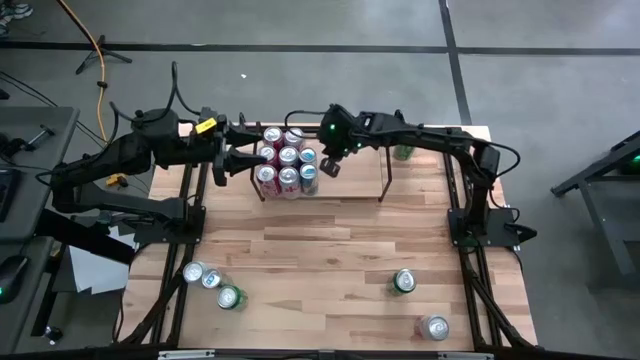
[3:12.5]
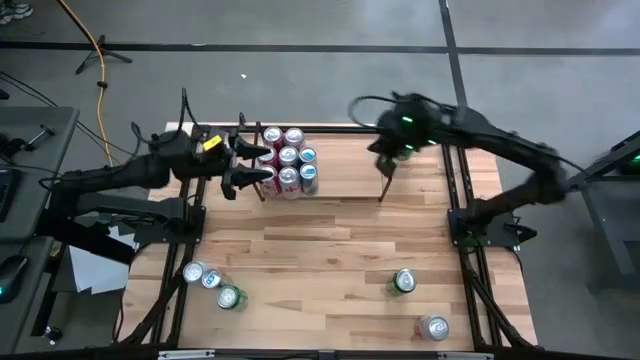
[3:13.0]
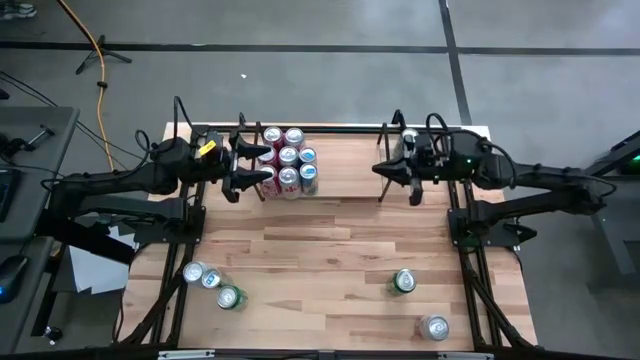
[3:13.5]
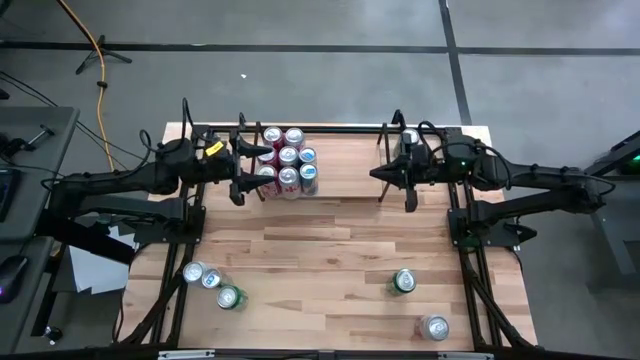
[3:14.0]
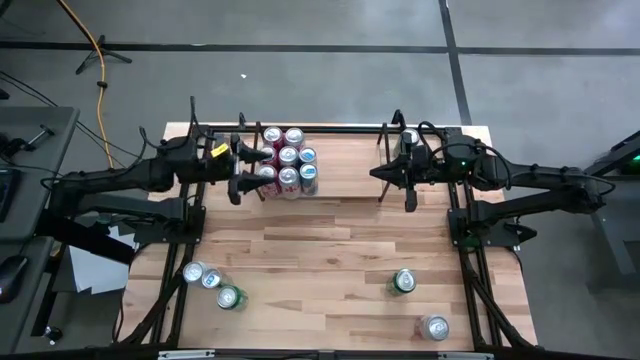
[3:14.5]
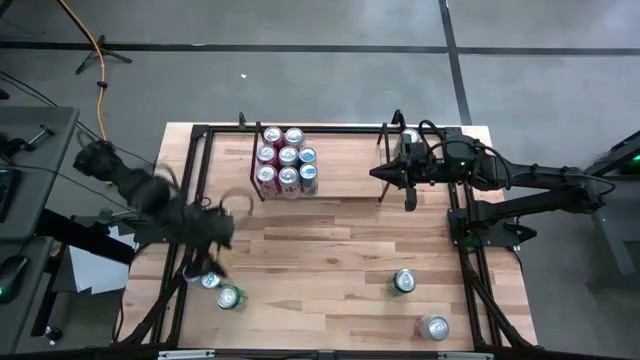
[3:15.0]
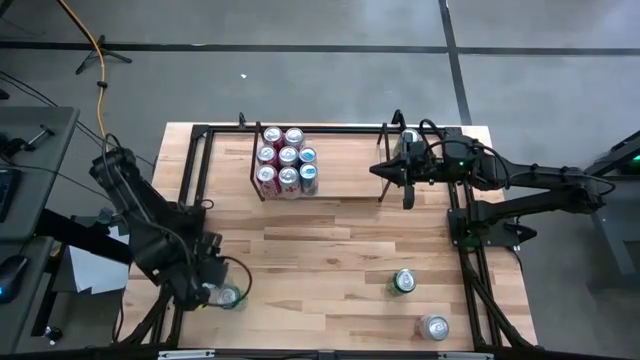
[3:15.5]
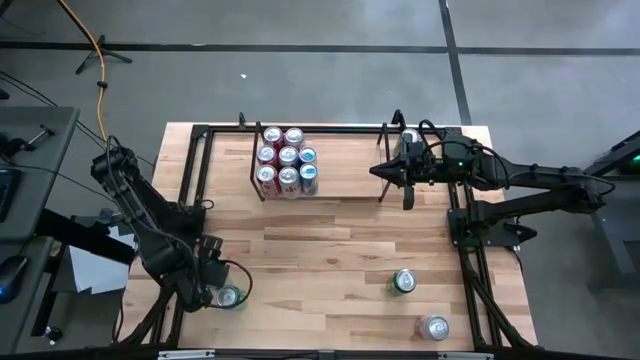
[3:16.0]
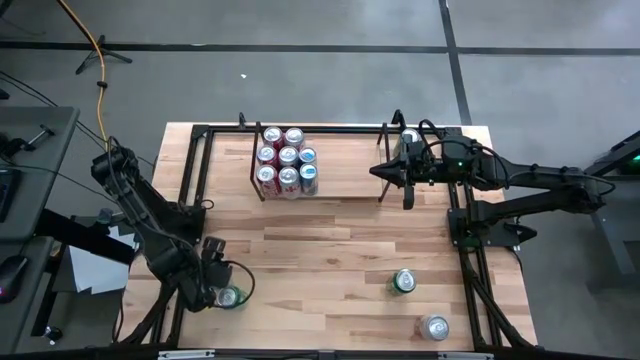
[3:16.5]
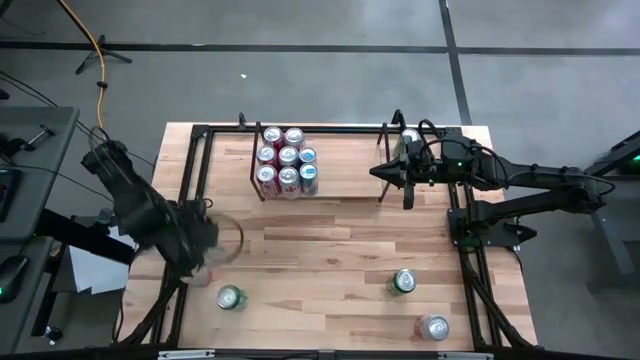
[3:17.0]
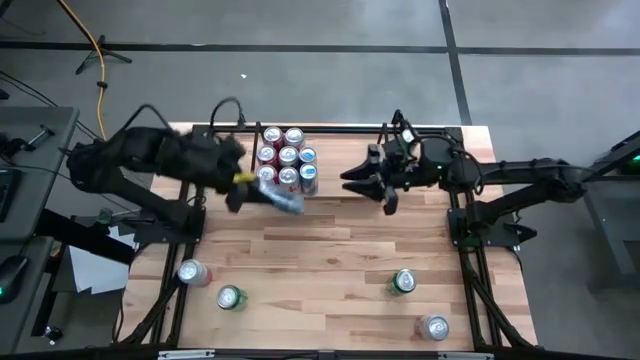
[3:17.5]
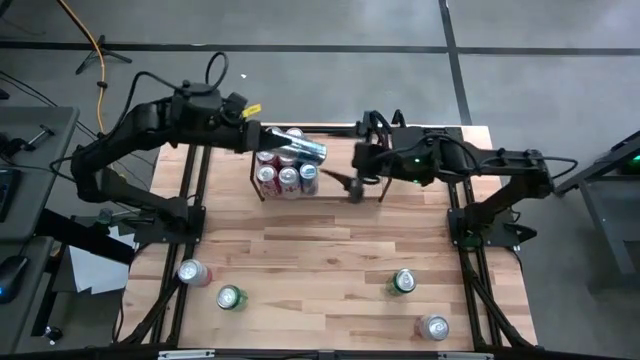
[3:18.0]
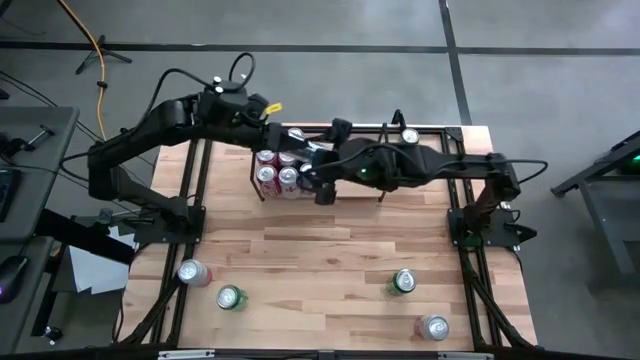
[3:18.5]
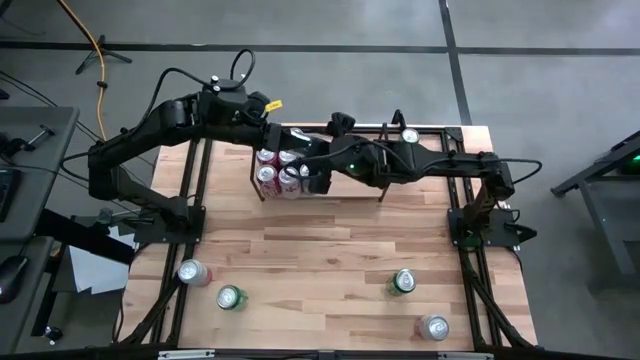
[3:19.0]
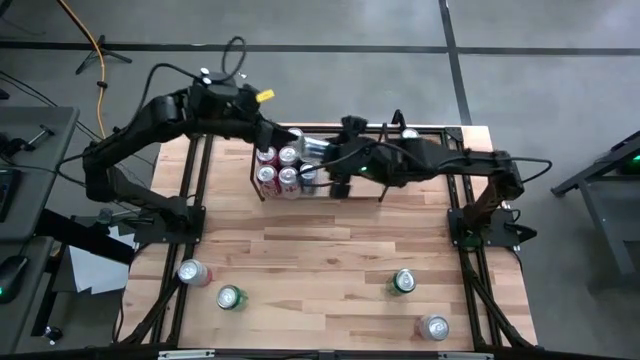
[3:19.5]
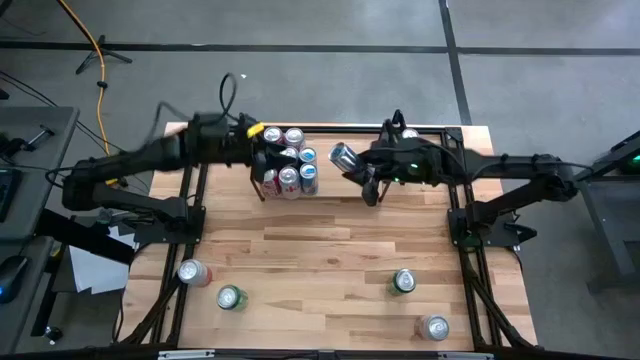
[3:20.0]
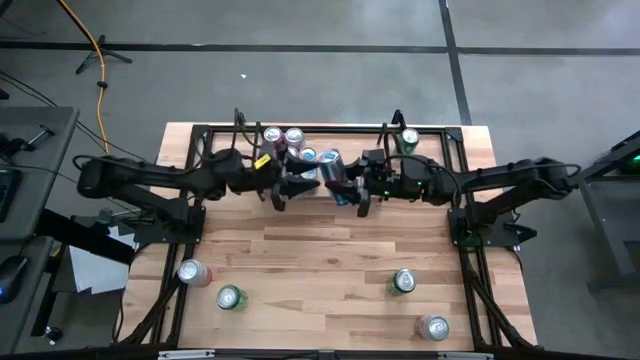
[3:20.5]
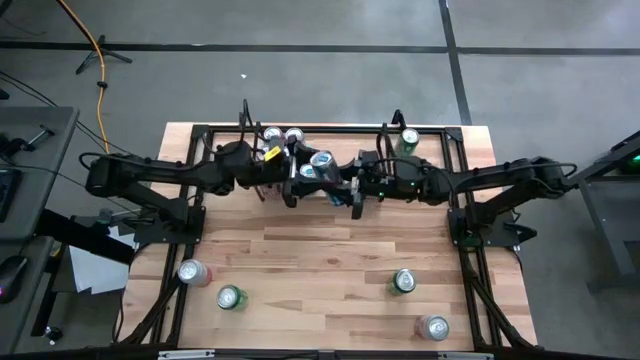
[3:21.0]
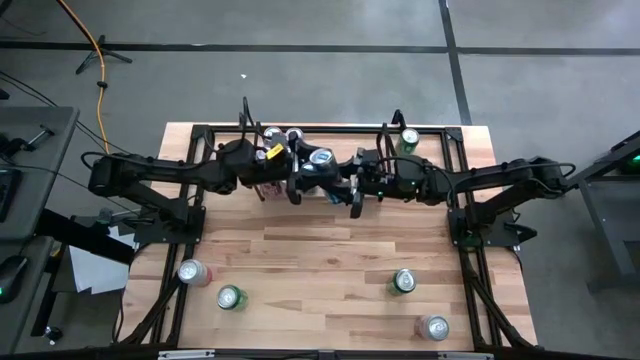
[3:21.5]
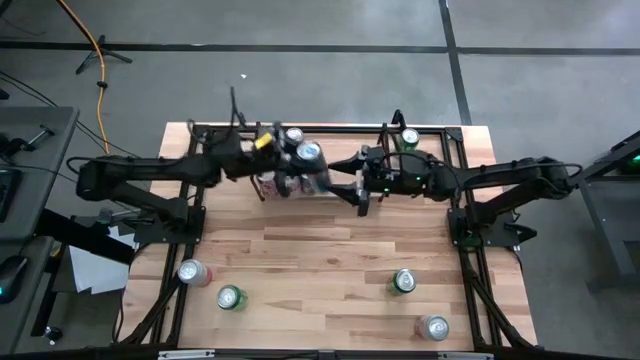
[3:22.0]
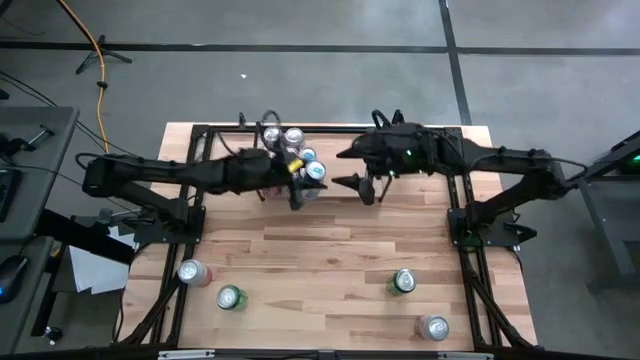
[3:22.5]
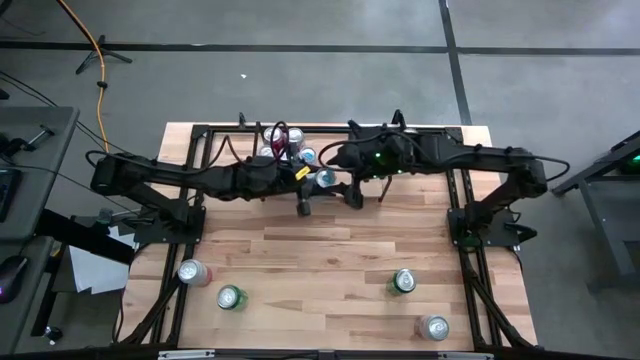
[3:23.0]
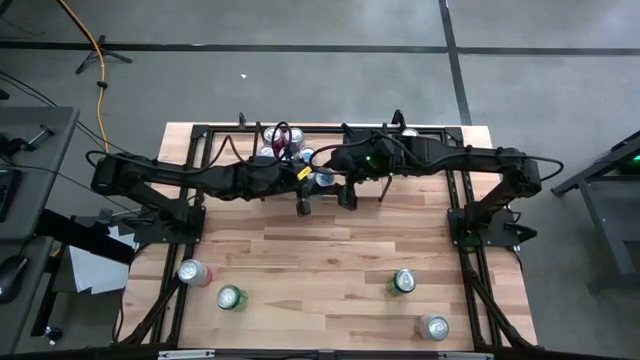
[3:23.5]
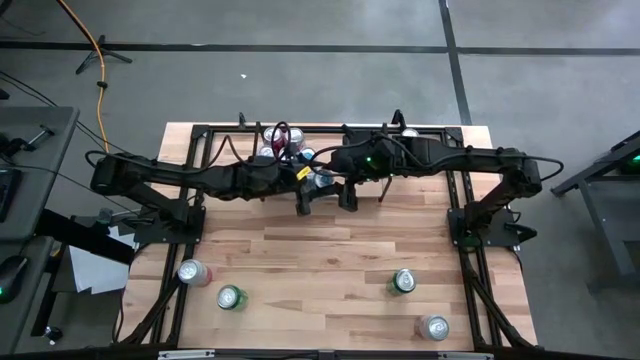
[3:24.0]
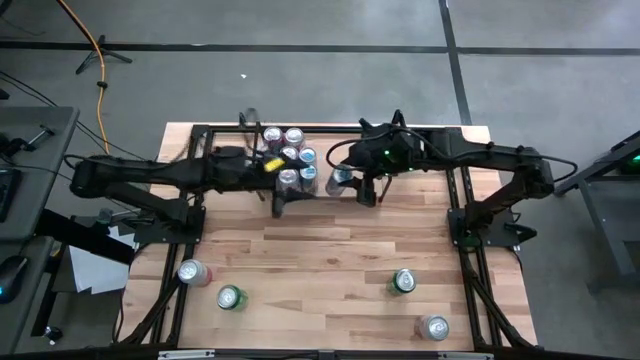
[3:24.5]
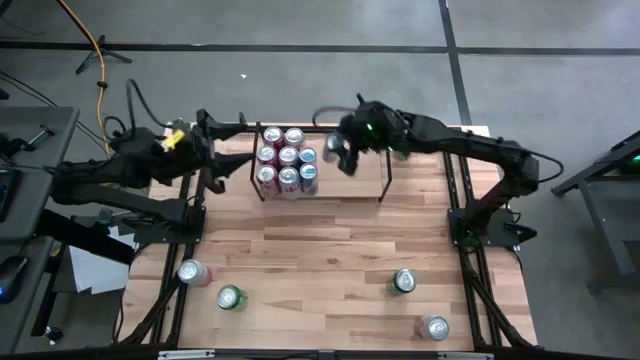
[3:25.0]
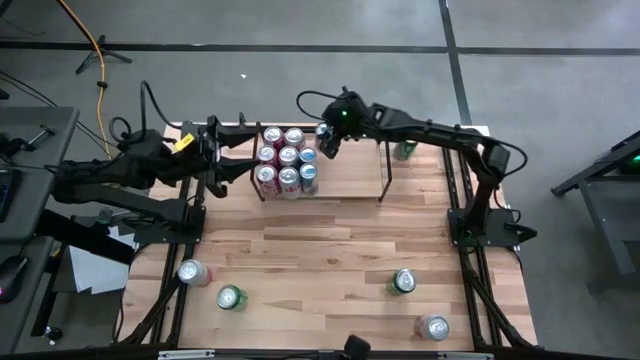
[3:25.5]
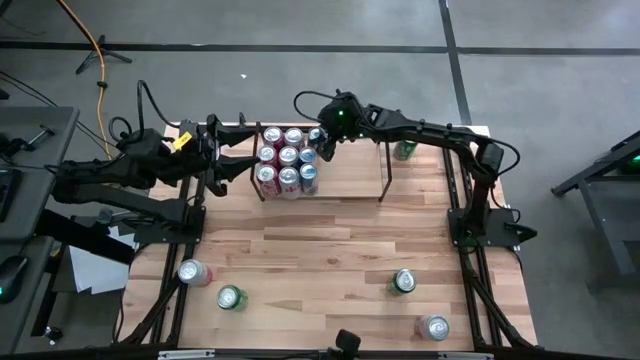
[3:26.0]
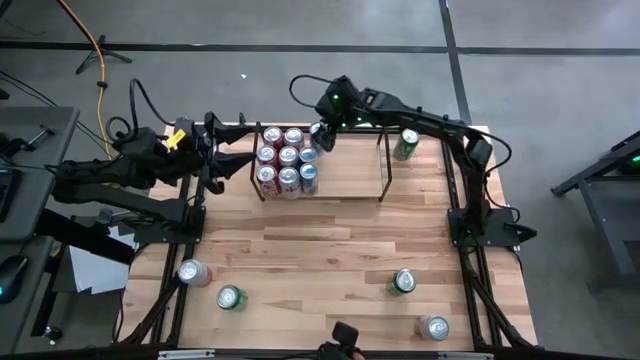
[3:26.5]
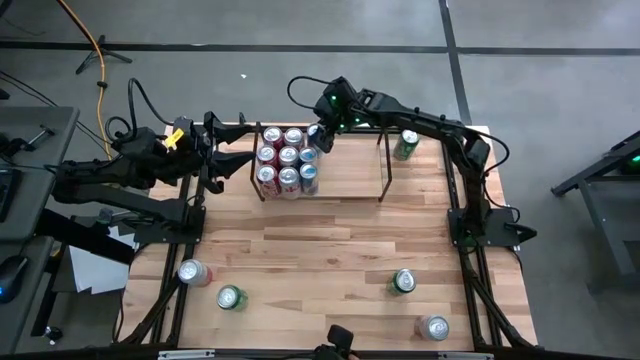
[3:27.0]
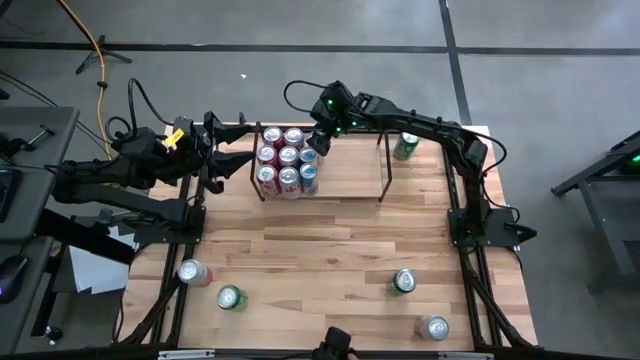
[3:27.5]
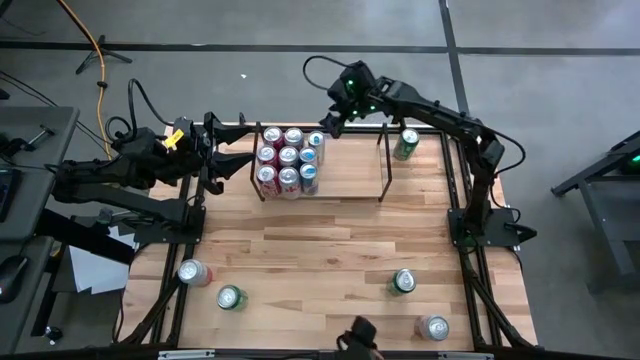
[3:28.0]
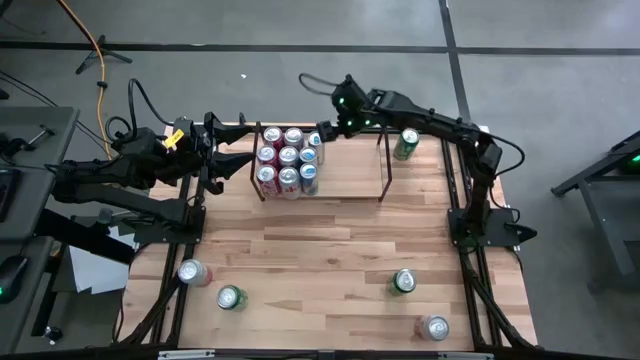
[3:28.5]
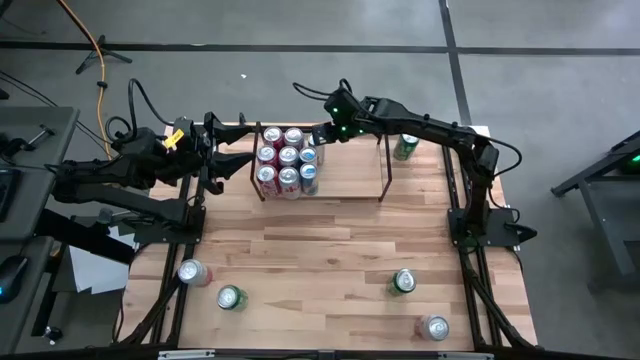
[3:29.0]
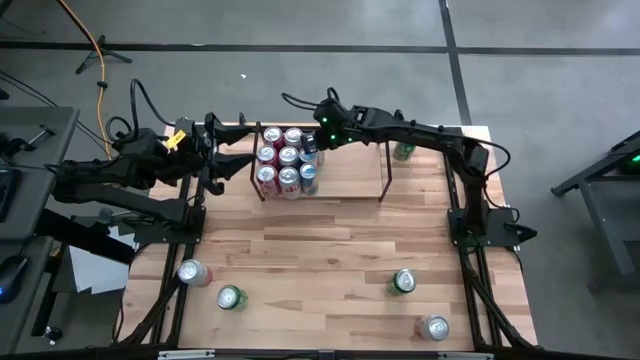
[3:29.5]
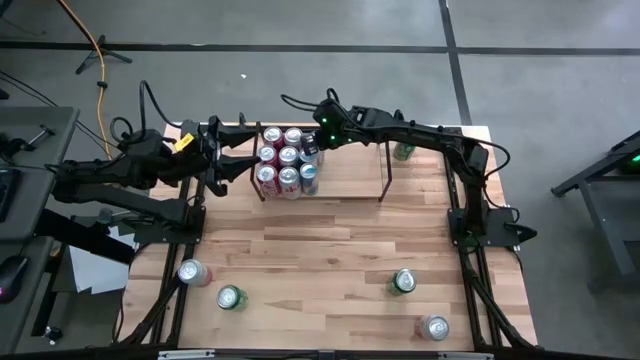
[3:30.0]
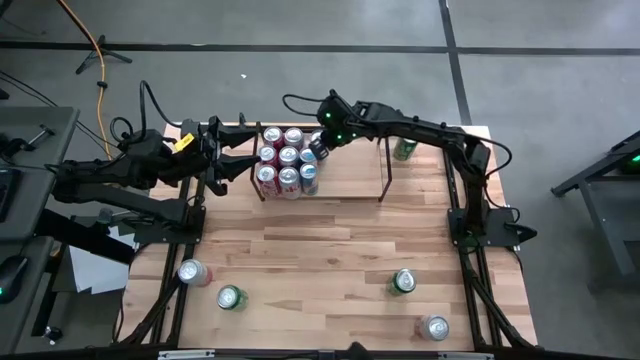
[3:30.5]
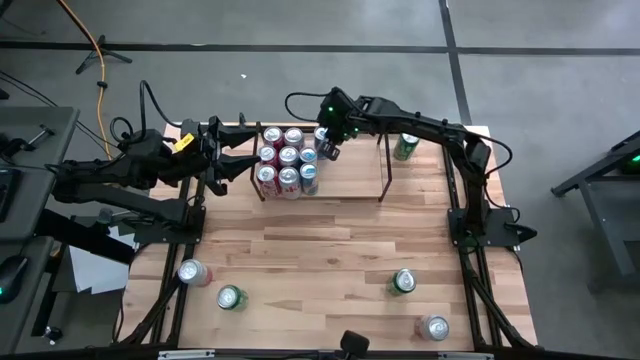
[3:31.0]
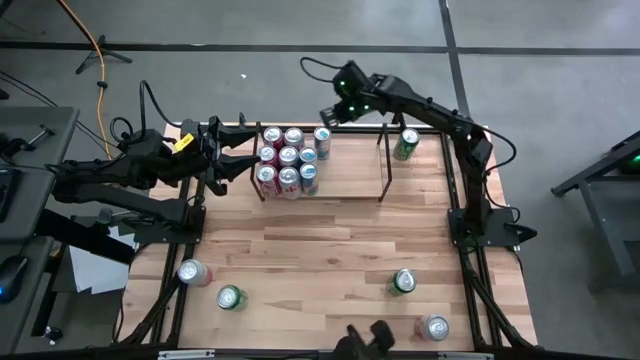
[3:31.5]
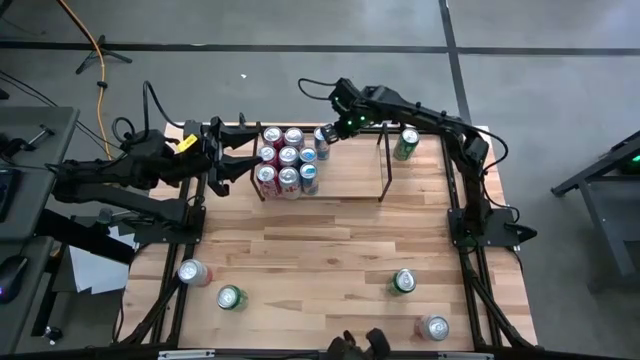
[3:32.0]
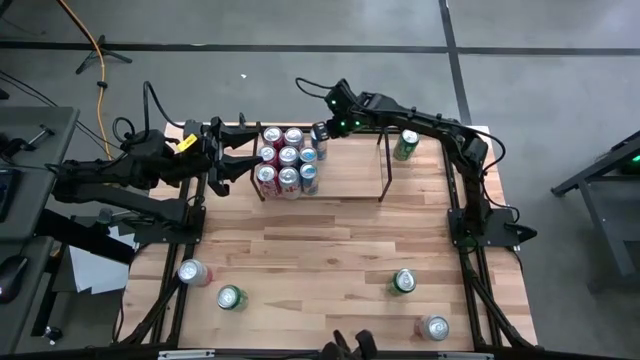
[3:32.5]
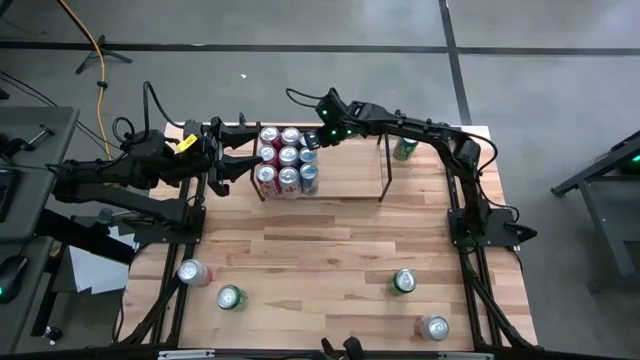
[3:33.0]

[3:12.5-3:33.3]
Task: Place canned beverage on shelf
Put the blue soda can on the shelf aligned with the other blue soda cans

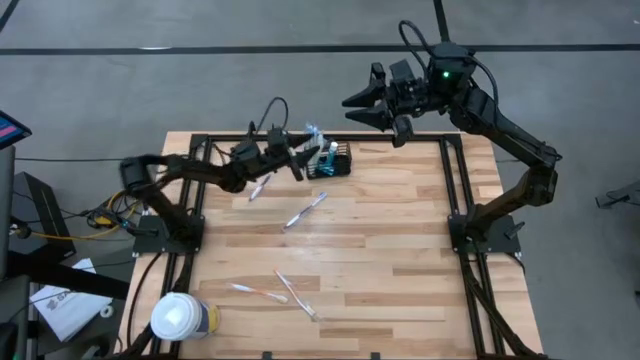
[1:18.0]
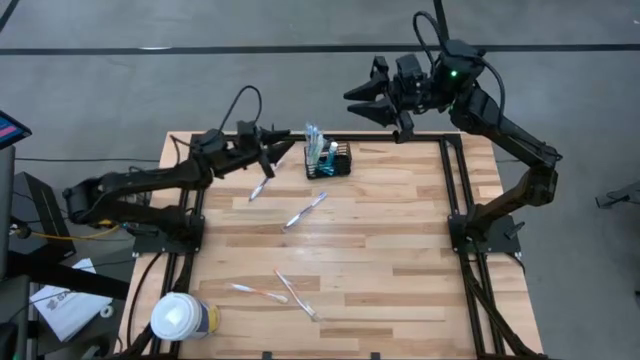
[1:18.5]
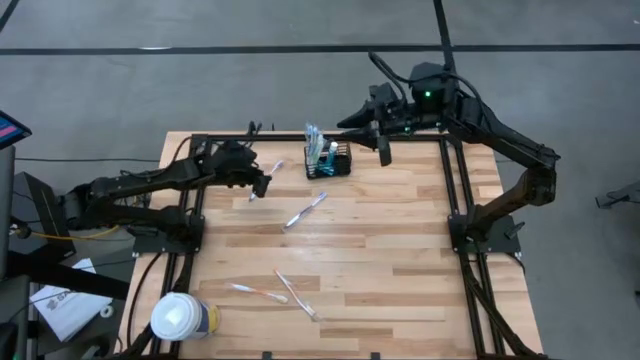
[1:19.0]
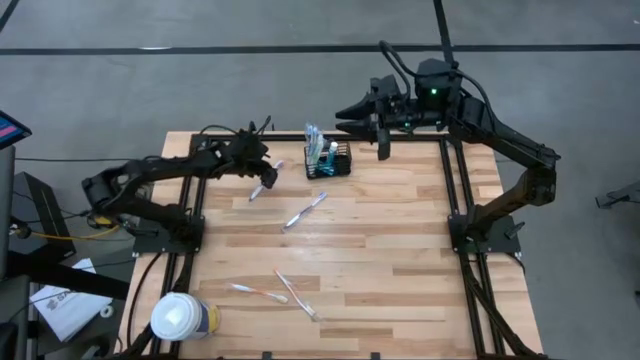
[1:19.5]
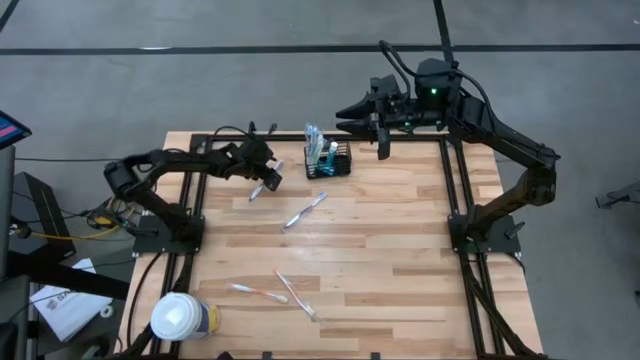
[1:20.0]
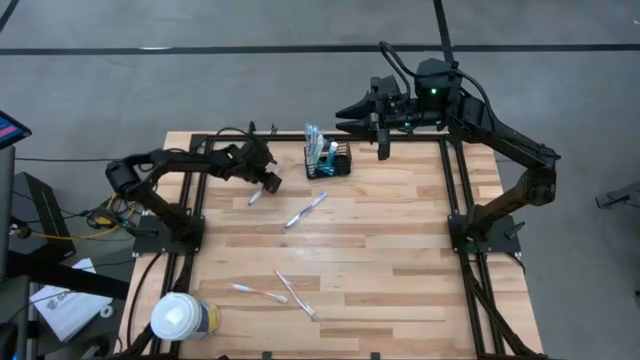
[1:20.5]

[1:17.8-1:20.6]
Task: Pick & Place toothbrushing station
Put the top purple toothbrush into the black wire organizer
